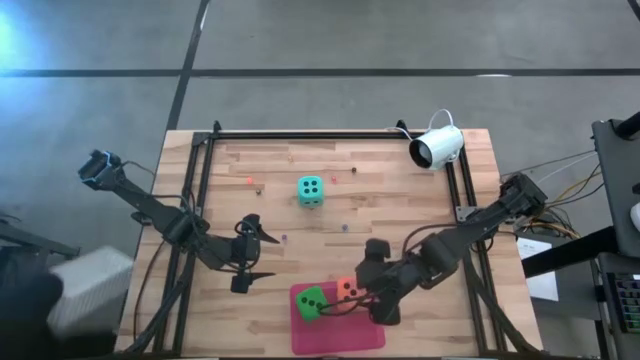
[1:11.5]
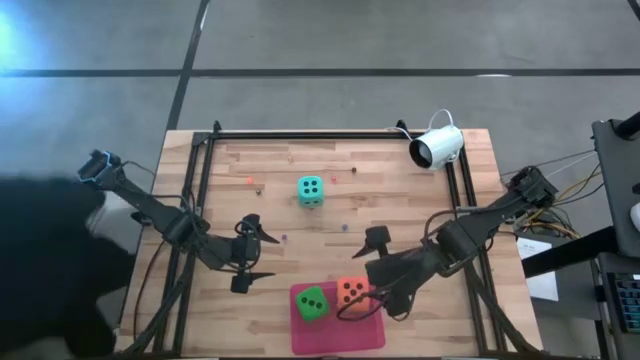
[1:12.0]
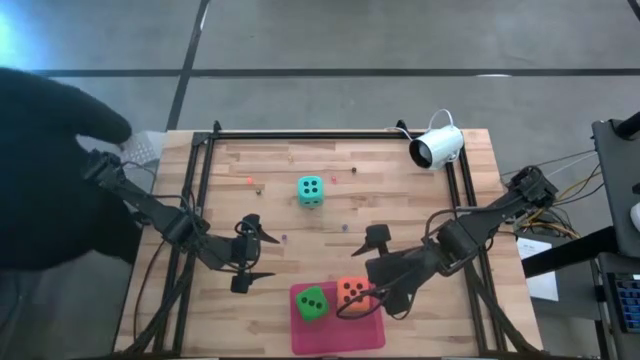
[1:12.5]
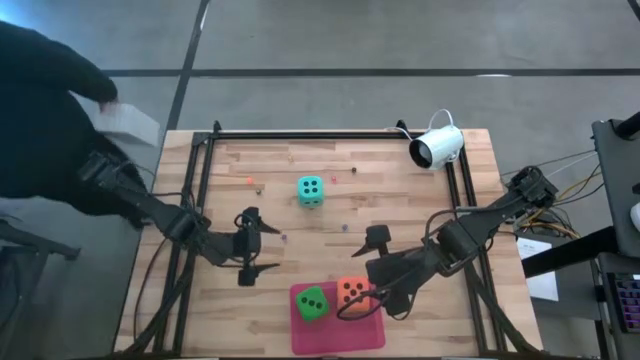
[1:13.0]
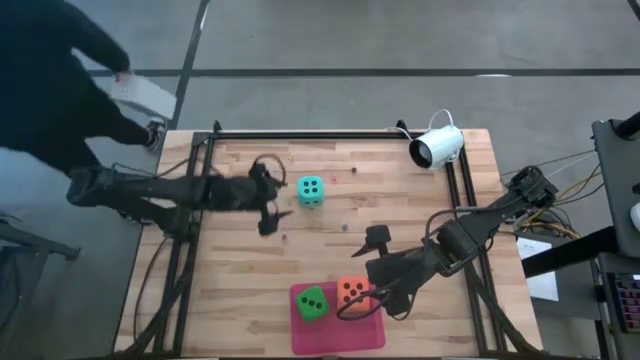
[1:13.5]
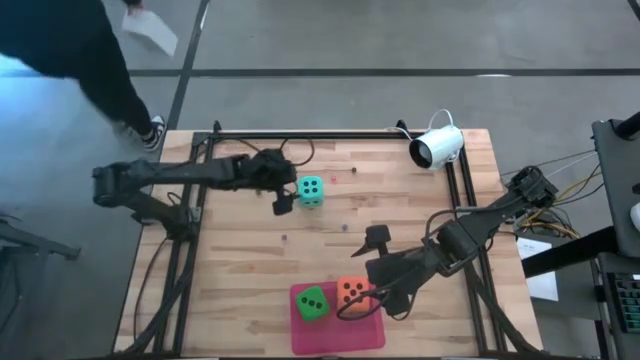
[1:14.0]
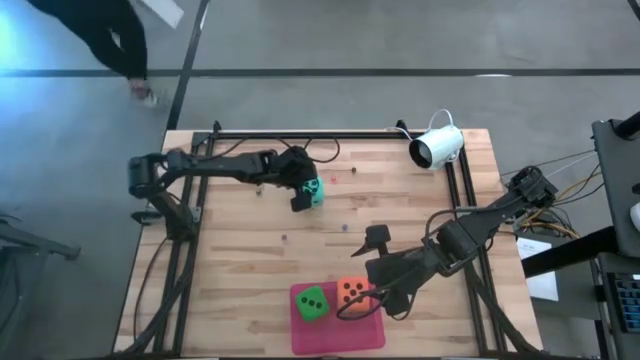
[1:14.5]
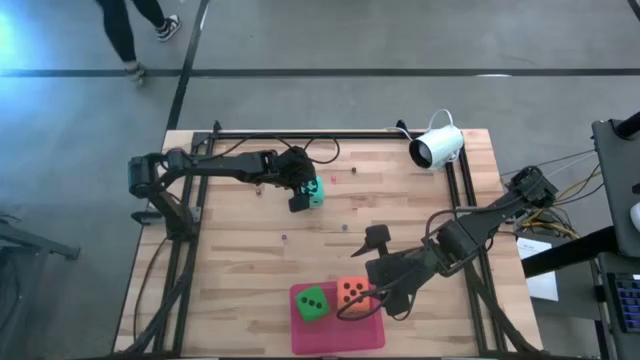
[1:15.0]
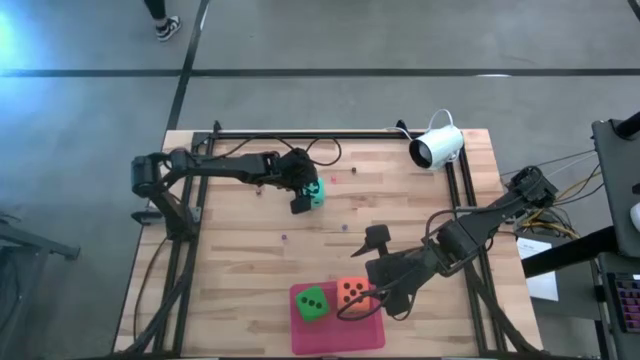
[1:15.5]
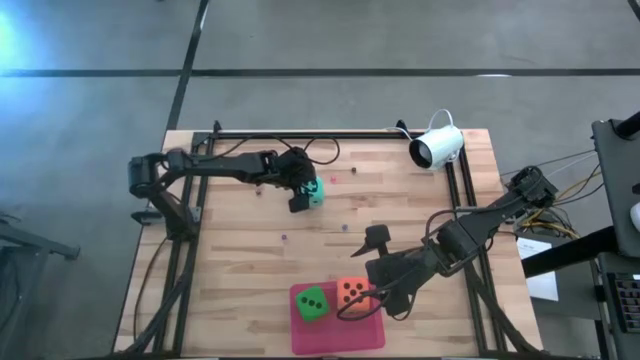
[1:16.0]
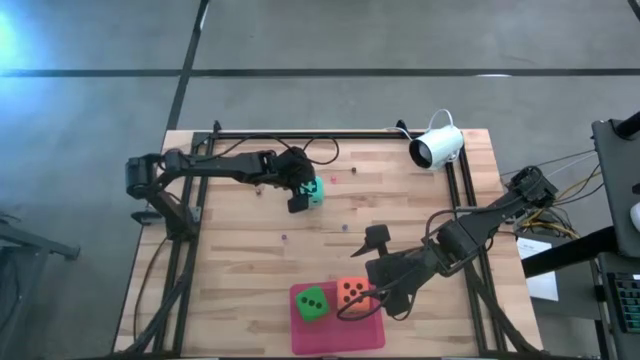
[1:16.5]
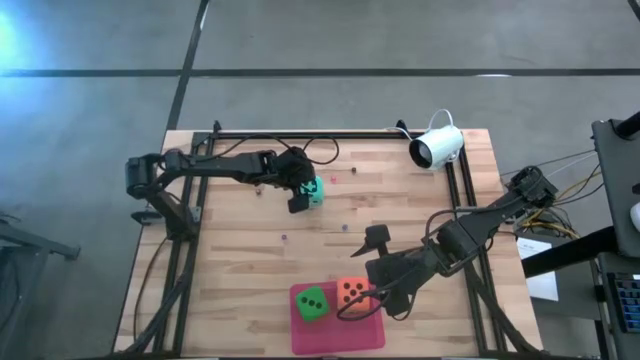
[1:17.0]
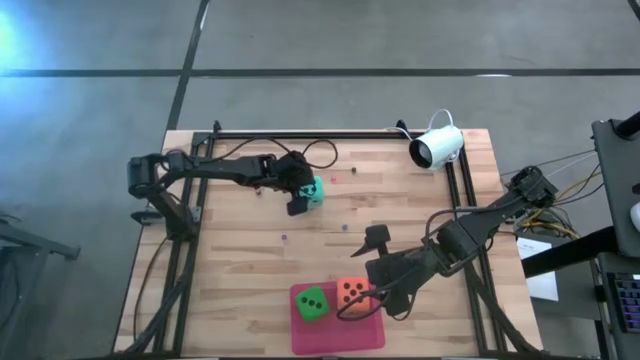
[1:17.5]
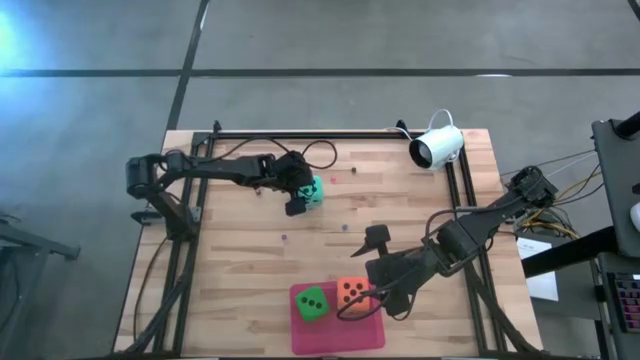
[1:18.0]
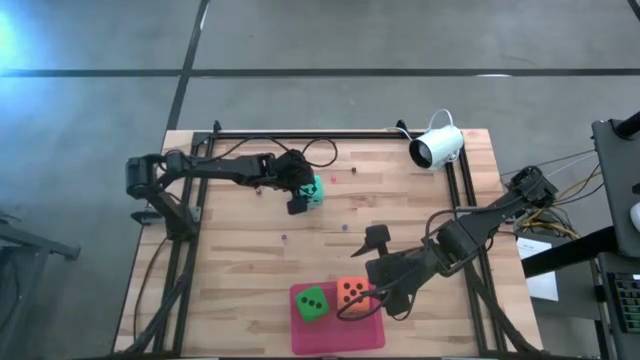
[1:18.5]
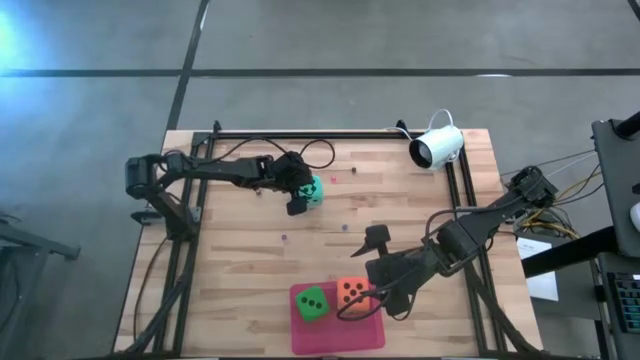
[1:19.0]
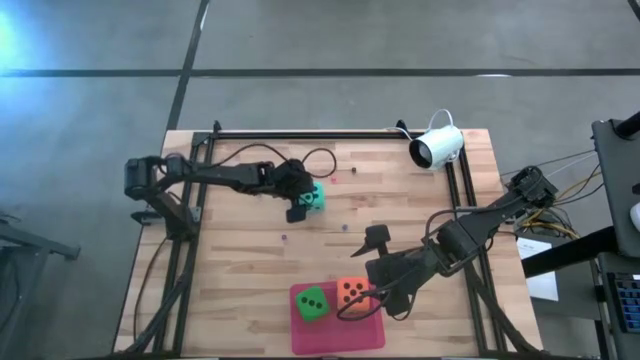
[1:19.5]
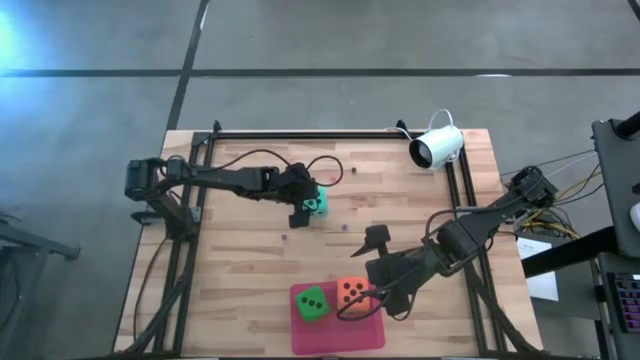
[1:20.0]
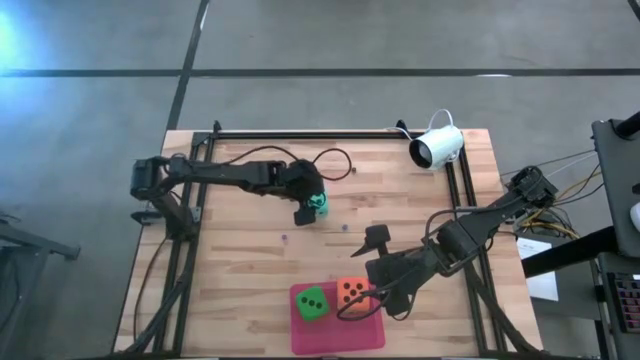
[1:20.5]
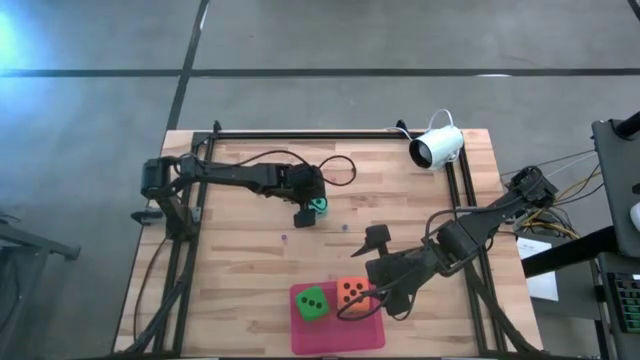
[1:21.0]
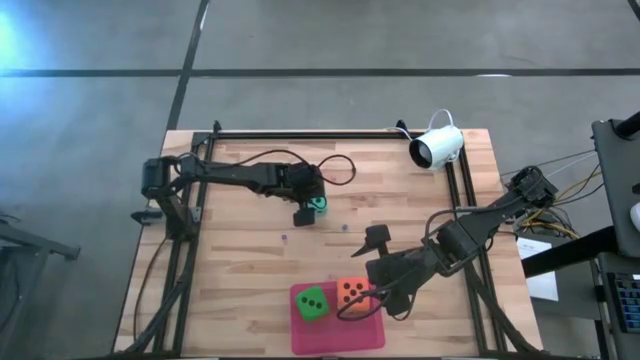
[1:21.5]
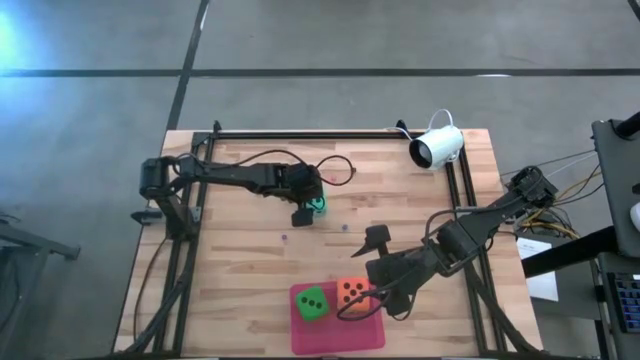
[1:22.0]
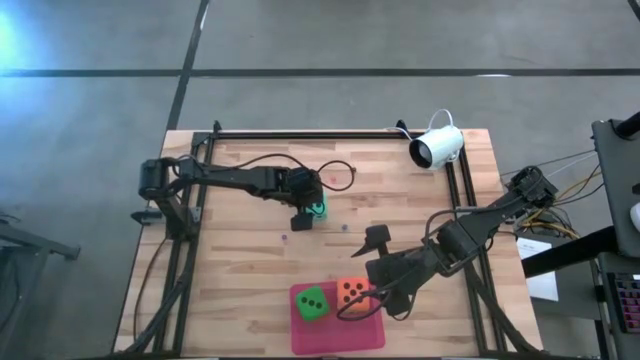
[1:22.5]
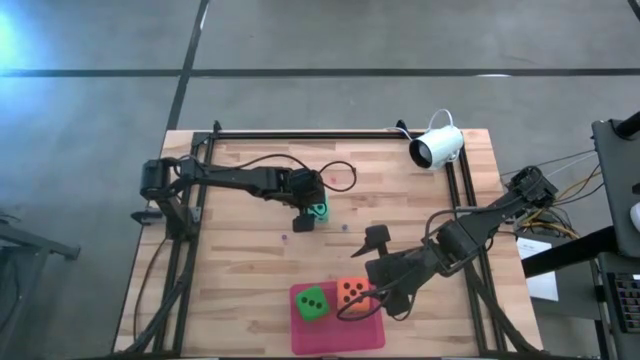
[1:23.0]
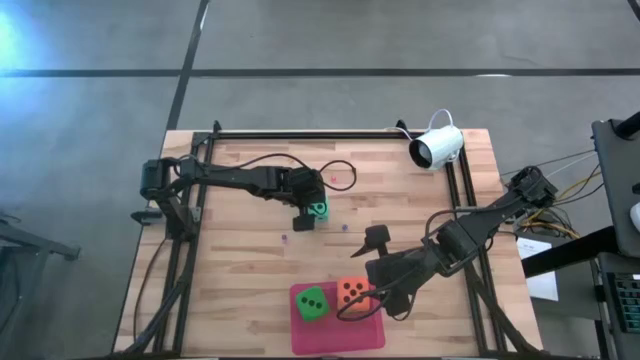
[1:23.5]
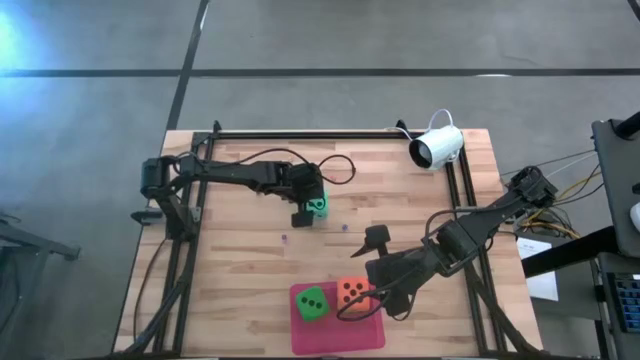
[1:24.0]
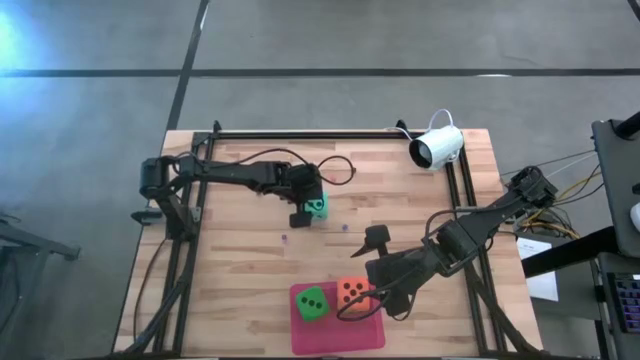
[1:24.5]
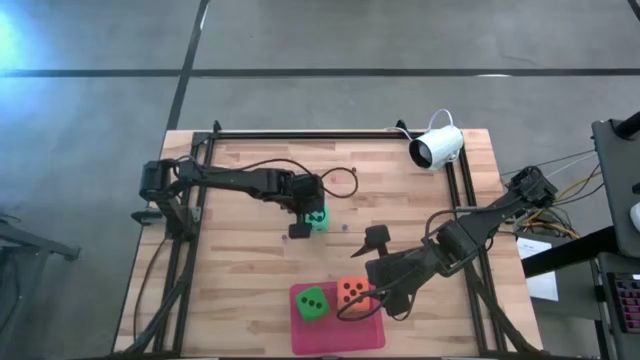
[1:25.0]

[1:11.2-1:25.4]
Task: Pick & Place Dice
Put the light blue dice into the pink bin

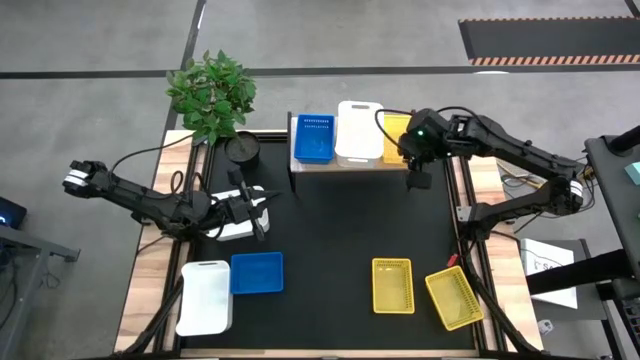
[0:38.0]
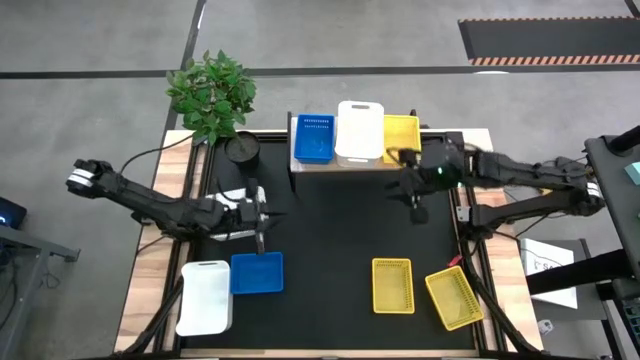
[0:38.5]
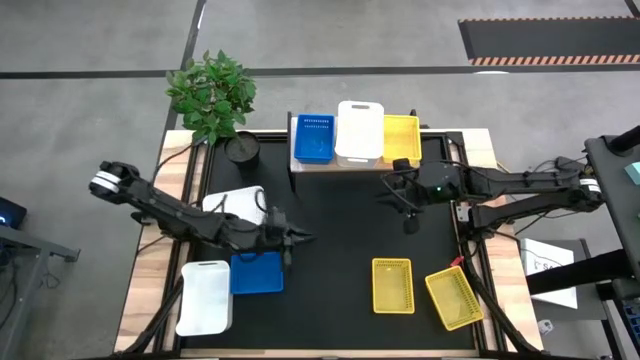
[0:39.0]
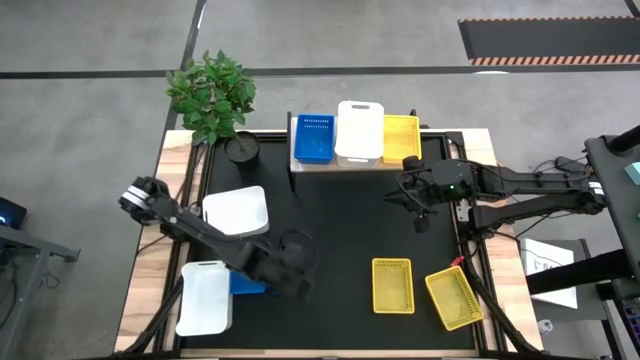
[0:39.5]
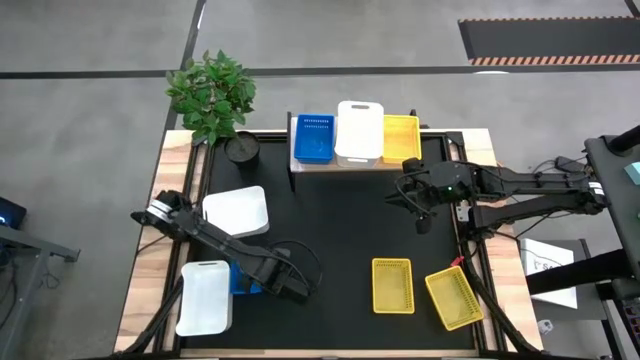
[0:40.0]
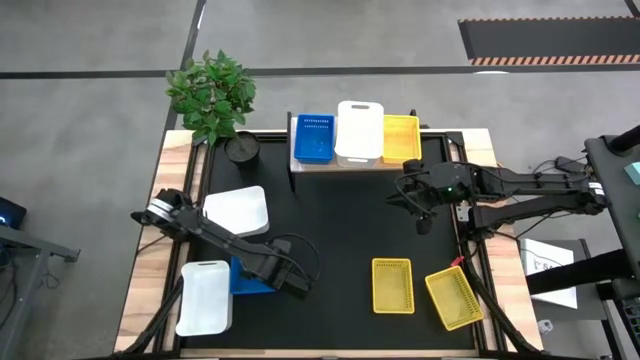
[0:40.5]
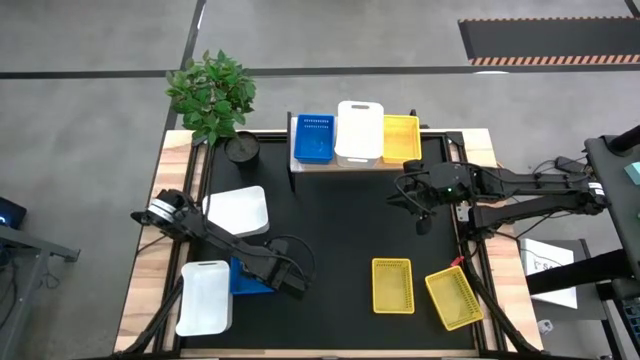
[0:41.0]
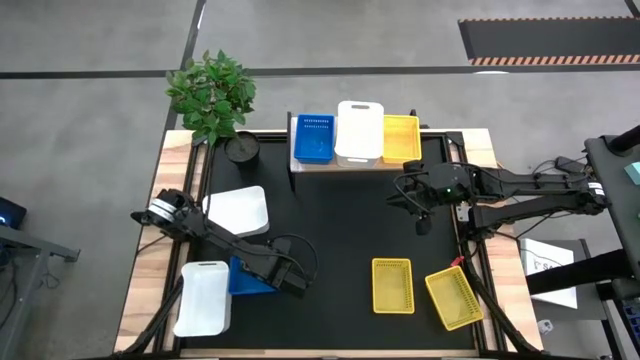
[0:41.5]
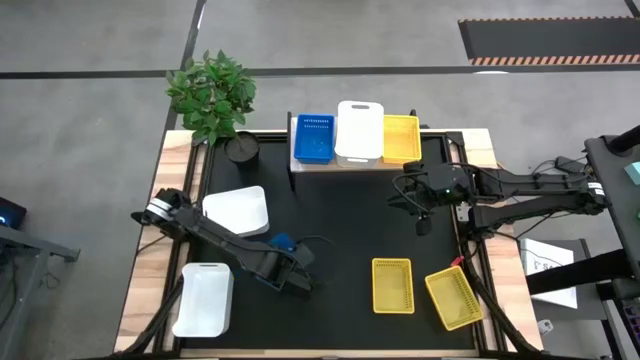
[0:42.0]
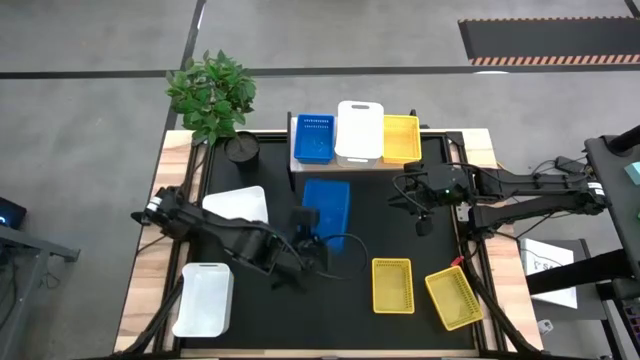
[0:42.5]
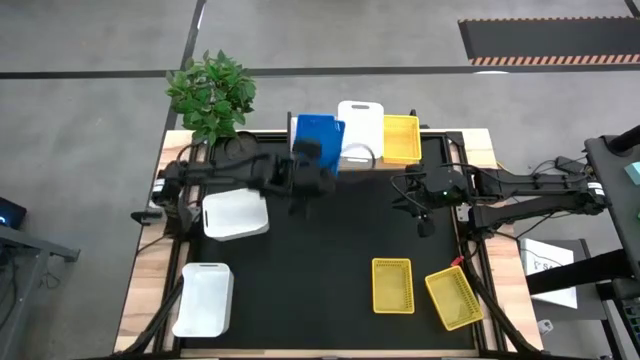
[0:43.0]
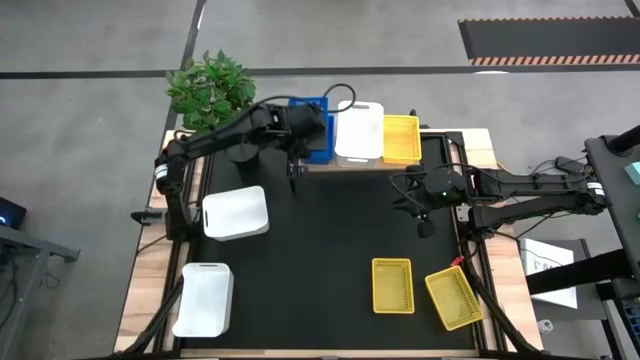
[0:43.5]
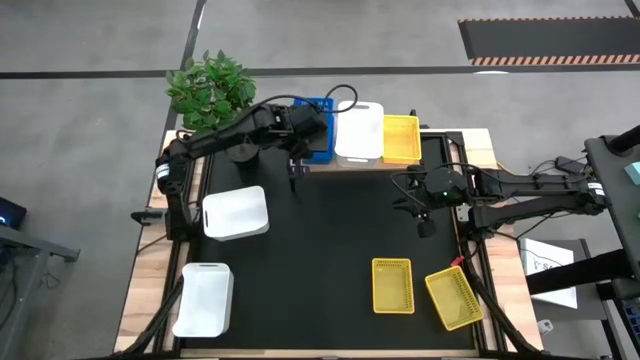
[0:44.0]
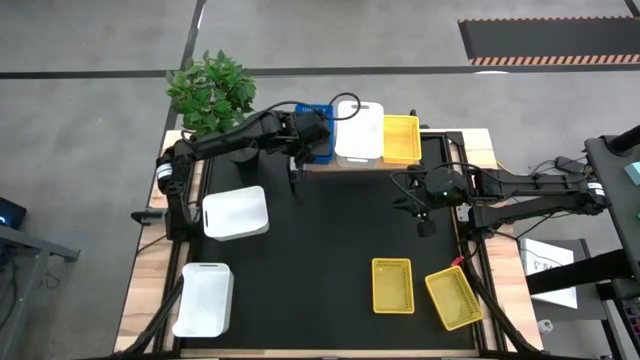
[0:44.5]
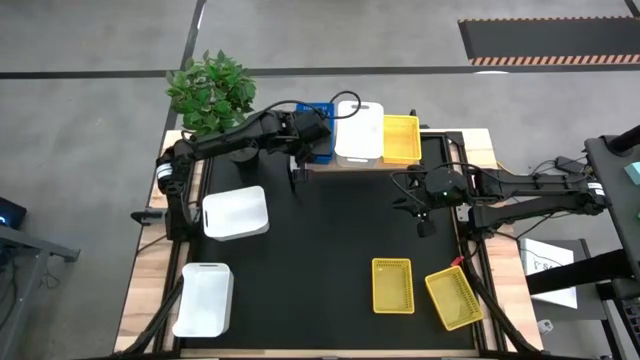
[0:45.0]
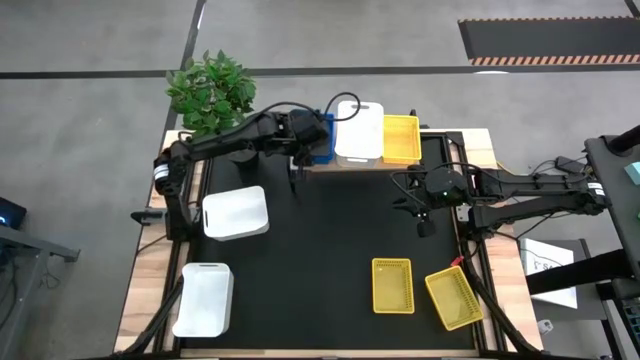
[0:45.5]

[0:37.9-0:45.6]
Task: Stack baskets on shelf by color
Stack the blue bin on the other blue bins on the shelf
